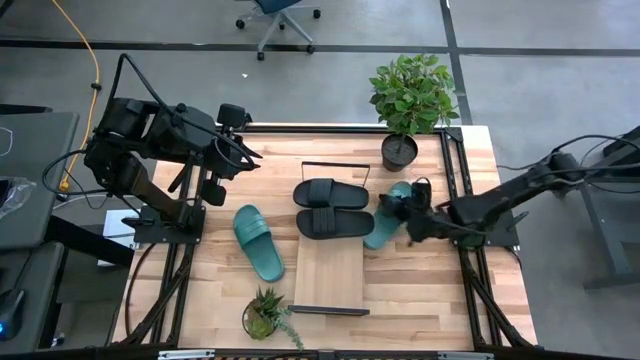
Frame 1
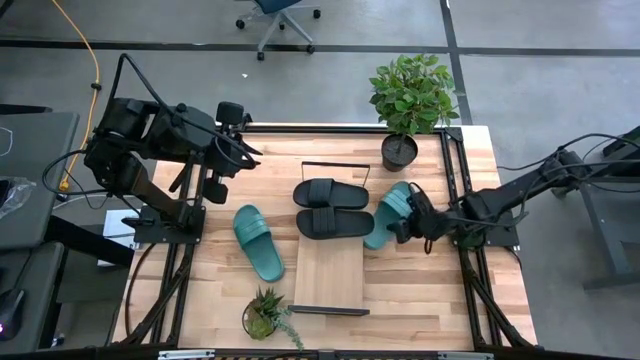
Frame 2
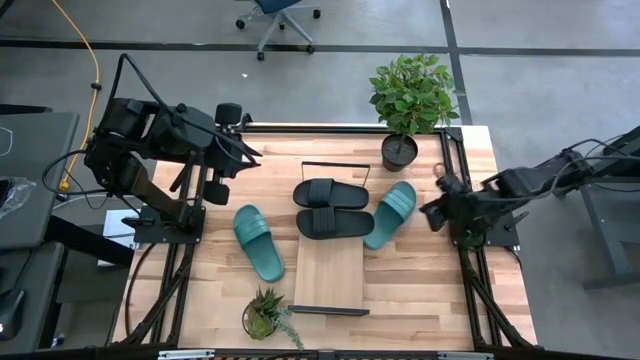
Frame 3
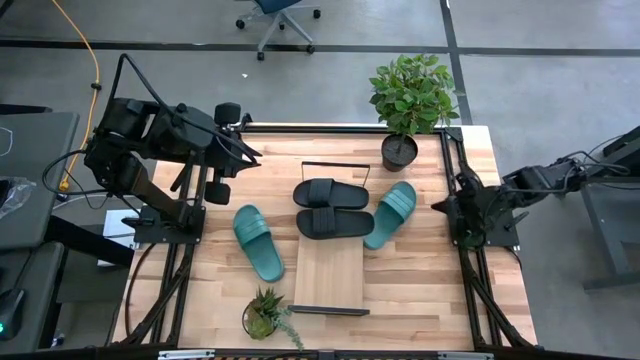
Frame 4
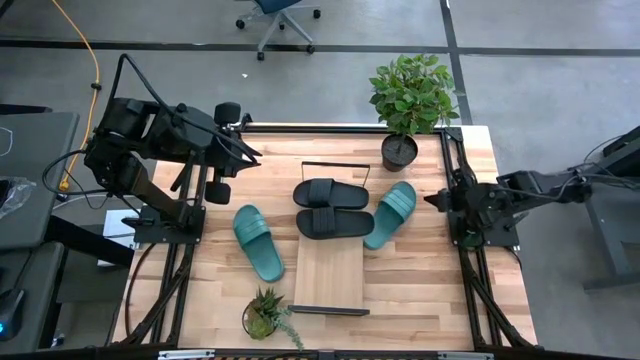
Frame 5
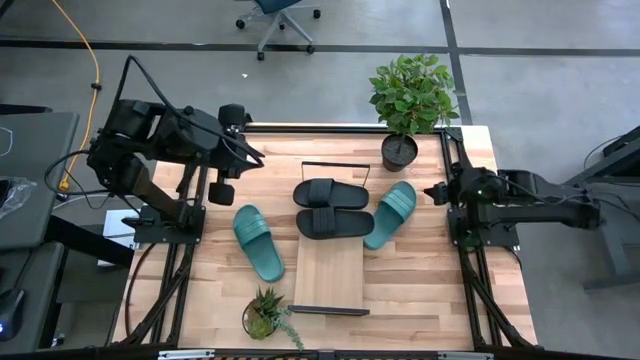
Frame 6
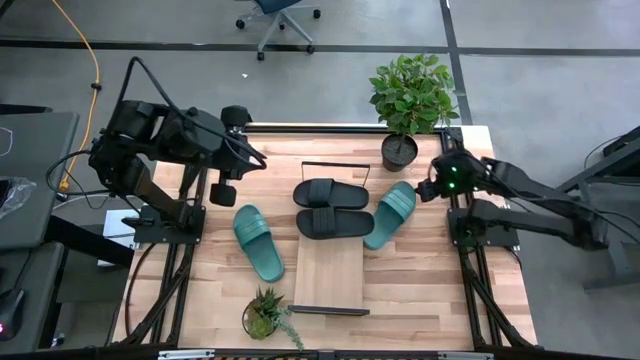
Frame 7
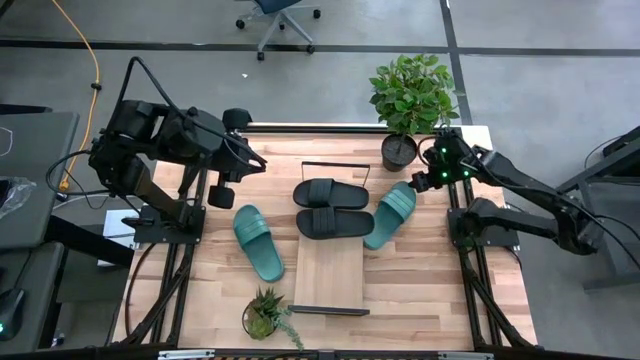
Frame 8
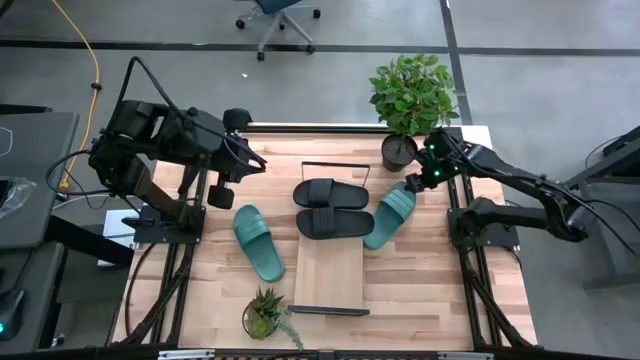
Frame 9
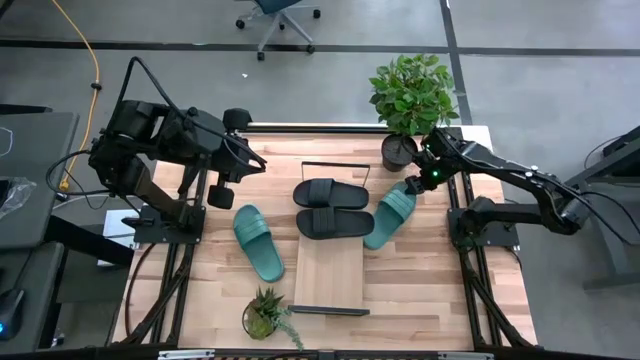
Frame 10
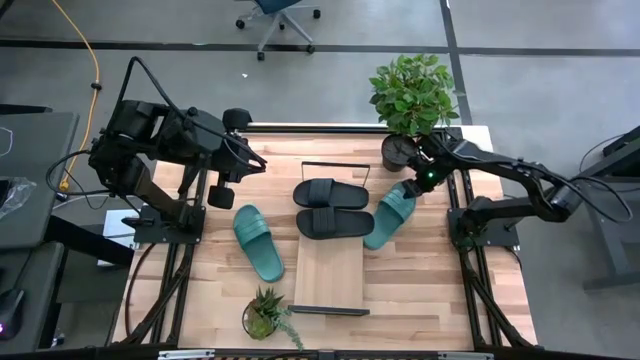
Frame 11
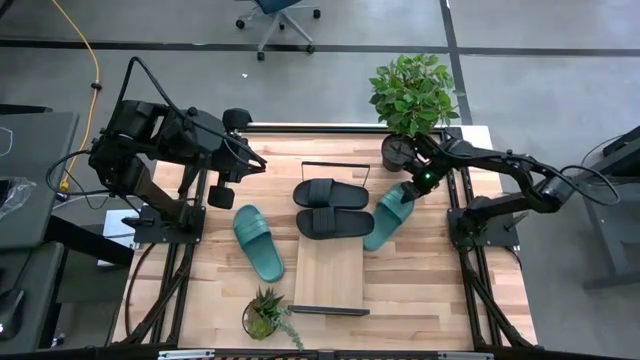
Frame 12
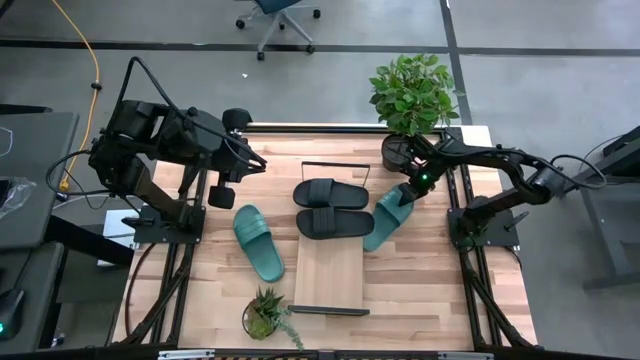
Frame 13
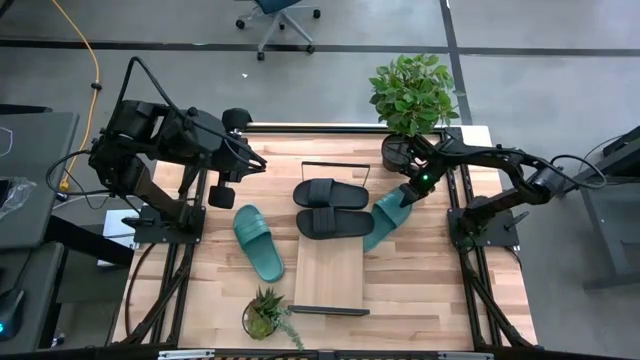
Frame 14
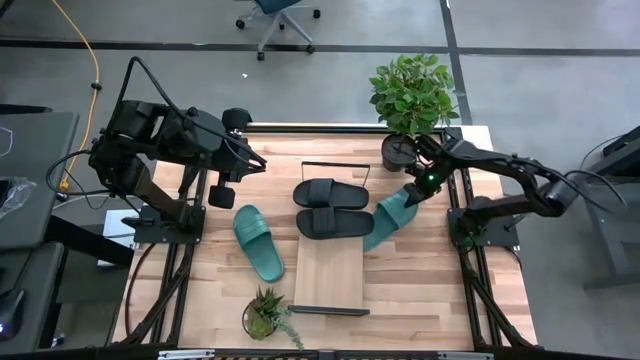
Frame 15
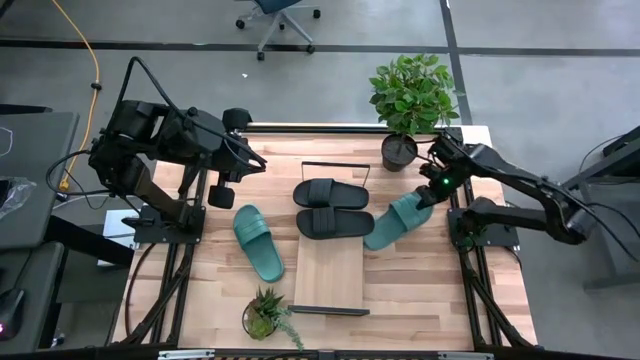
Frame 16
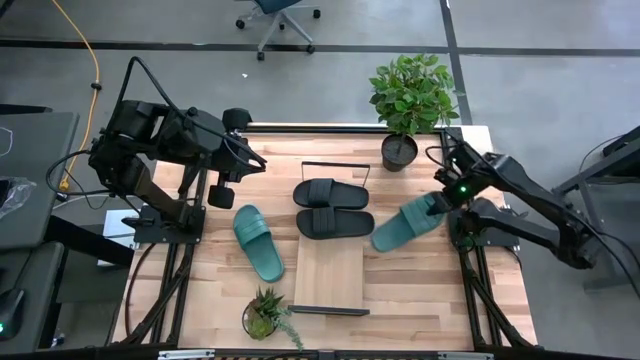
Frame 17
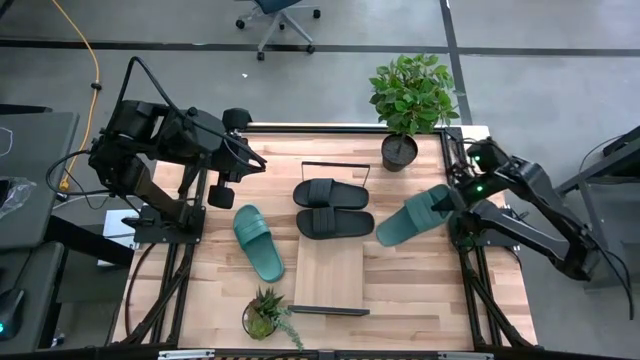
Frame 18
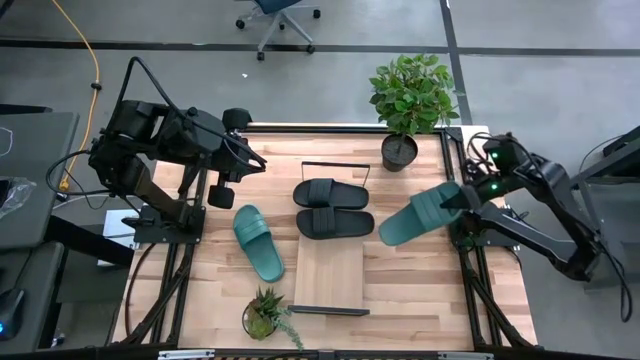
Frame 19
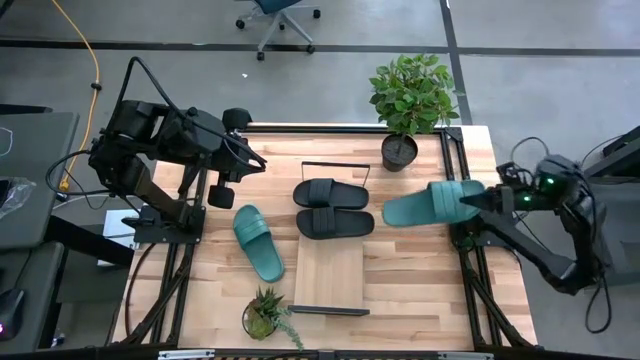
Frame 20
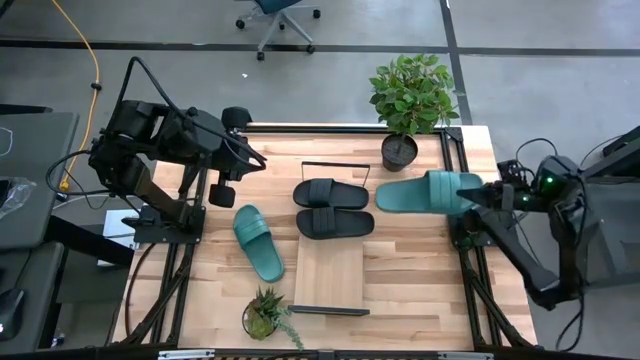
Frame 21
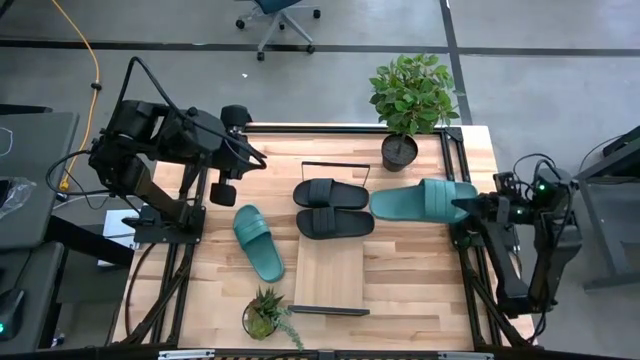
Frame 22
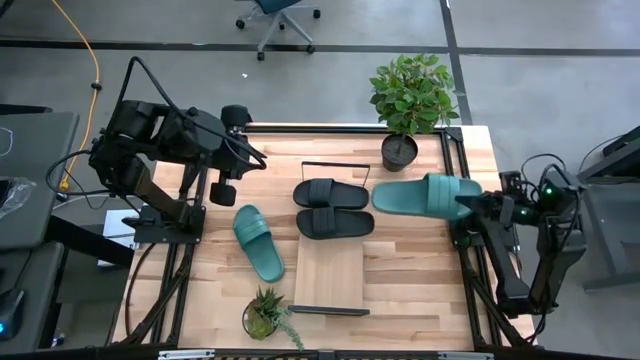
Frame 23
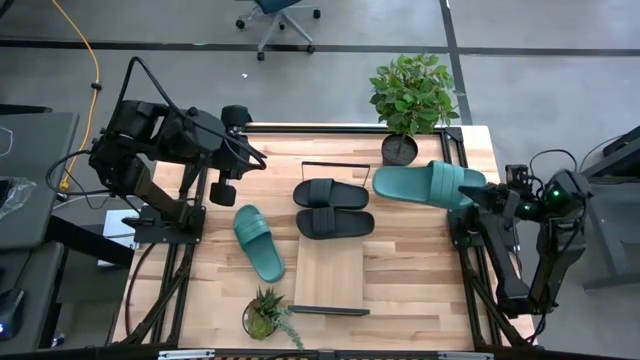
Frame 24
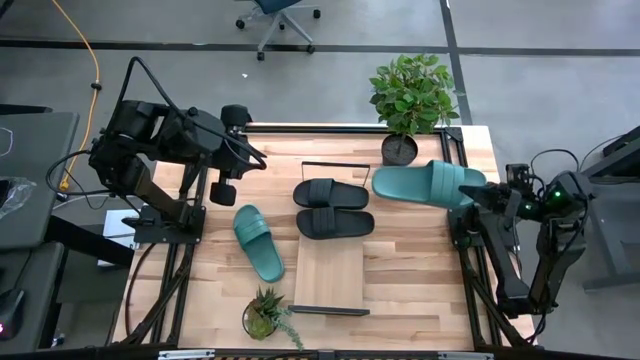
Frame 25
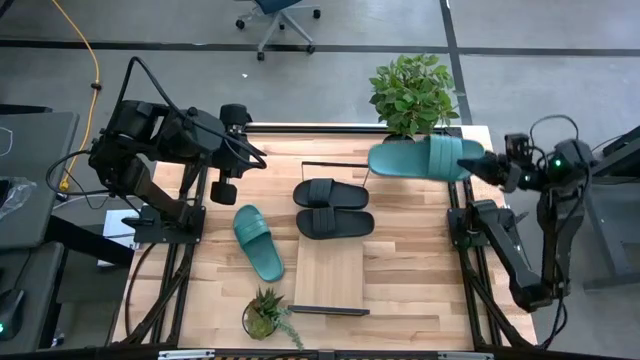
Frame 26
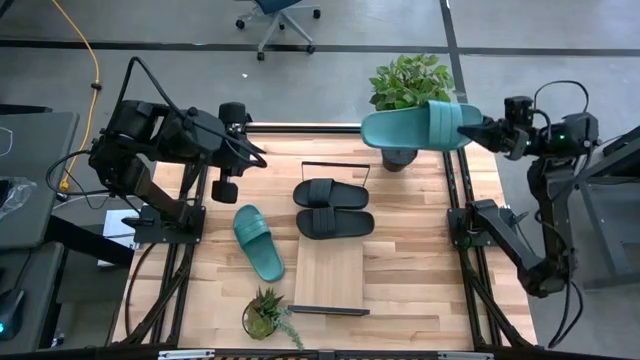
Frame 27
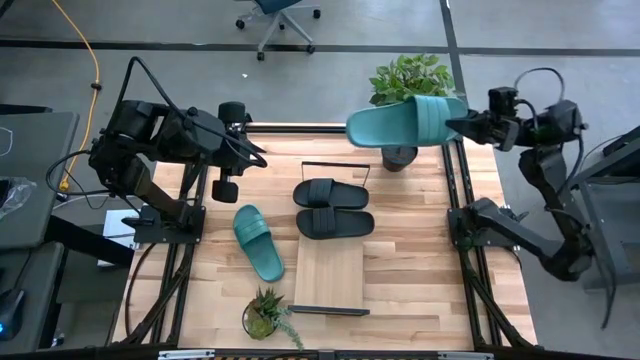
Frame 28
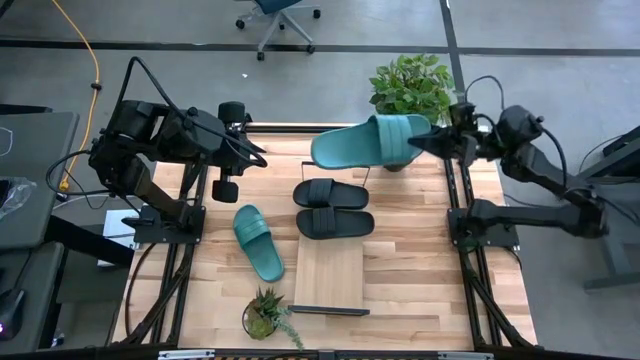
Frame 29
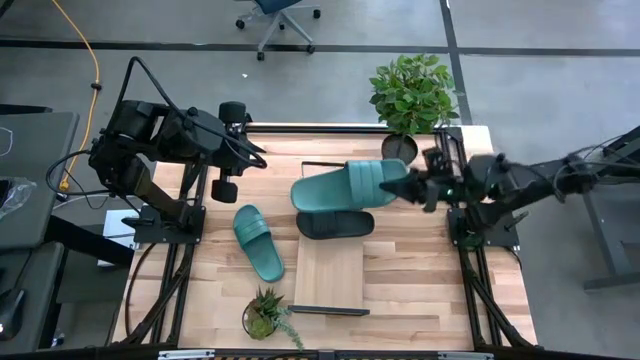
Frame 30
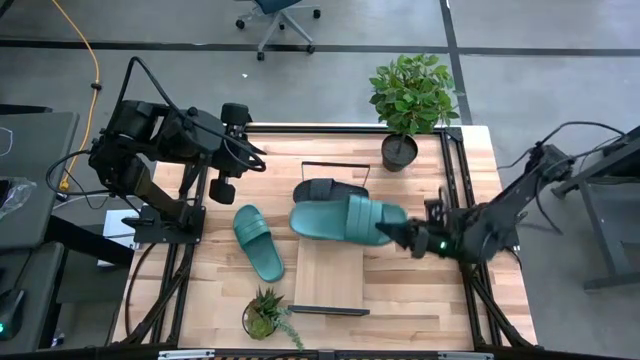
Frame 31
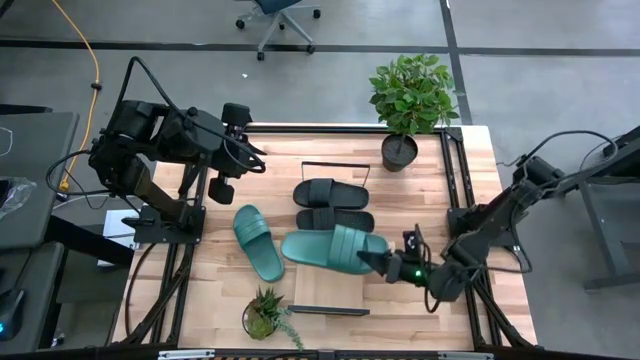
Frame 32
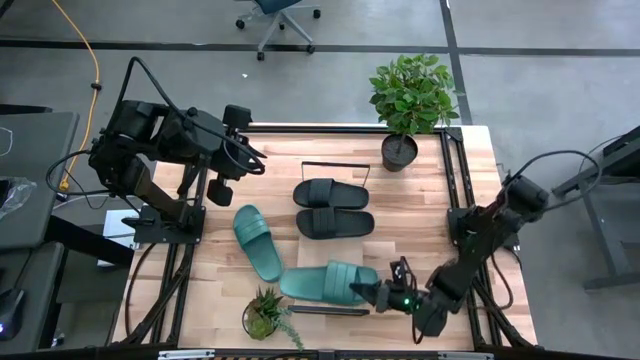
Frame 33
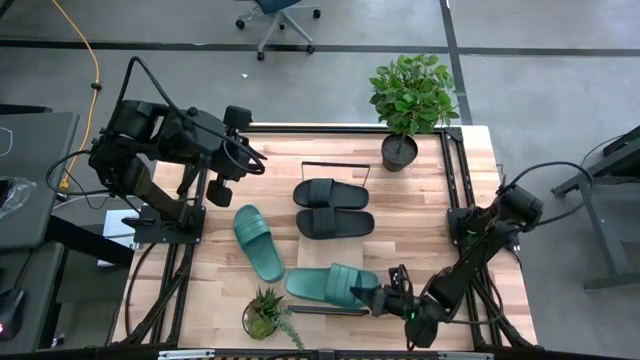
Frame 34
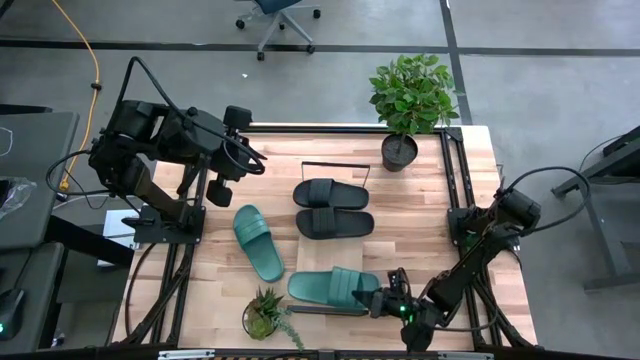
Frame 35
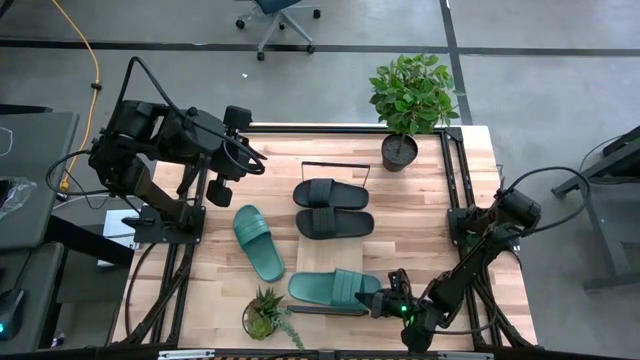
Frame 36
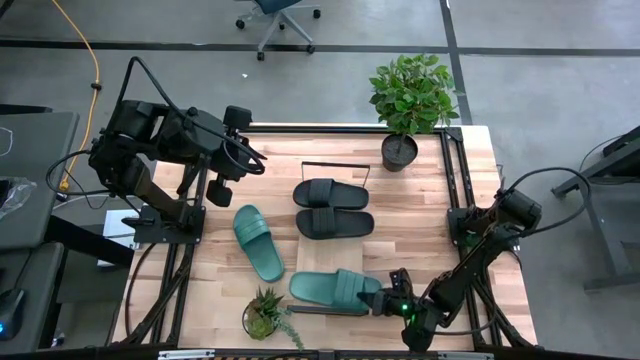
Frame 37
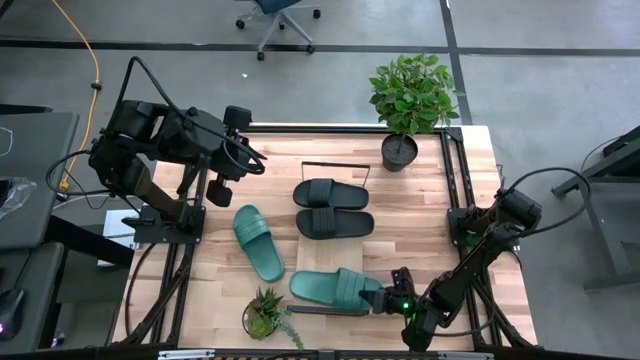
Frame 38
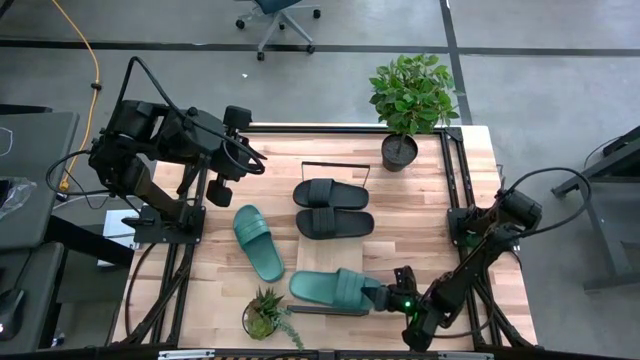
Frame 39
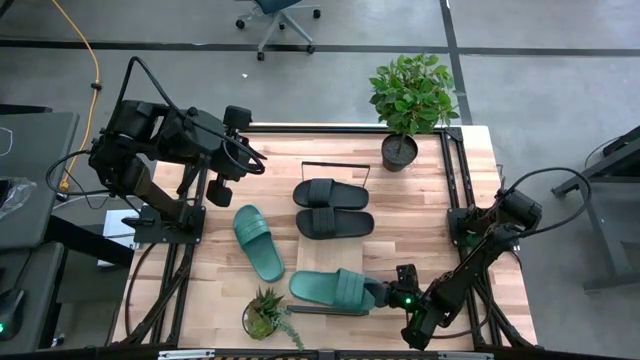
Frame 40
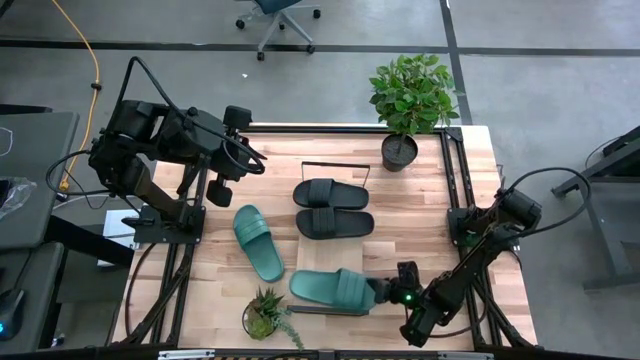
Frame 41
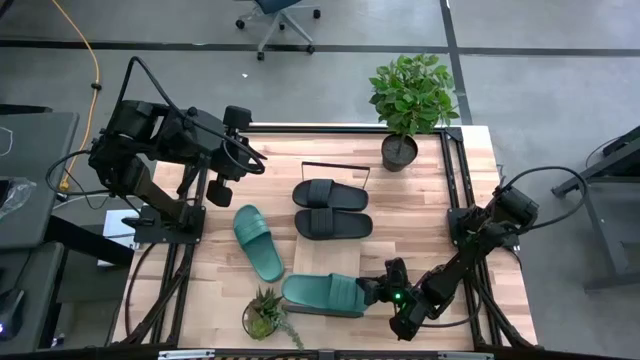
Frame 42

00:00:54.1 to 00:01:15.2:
Task: Pick and place slides into the shelf
Put the right green slides on the shelf

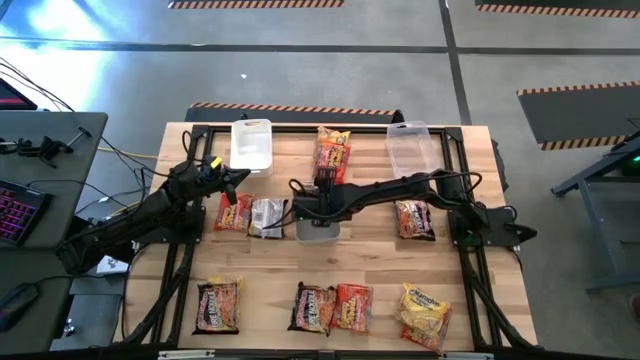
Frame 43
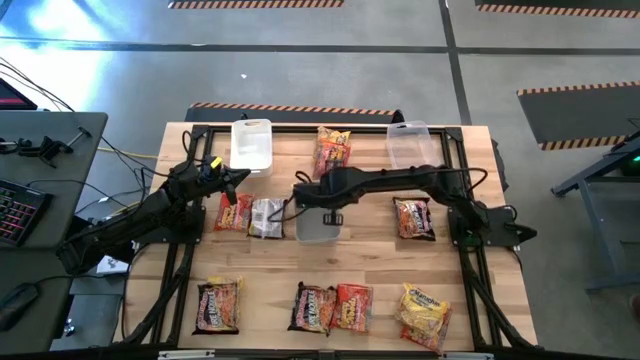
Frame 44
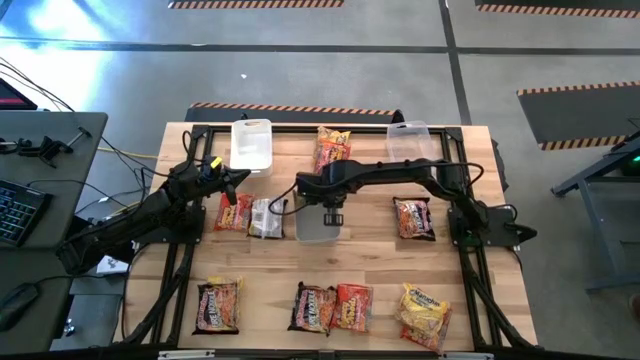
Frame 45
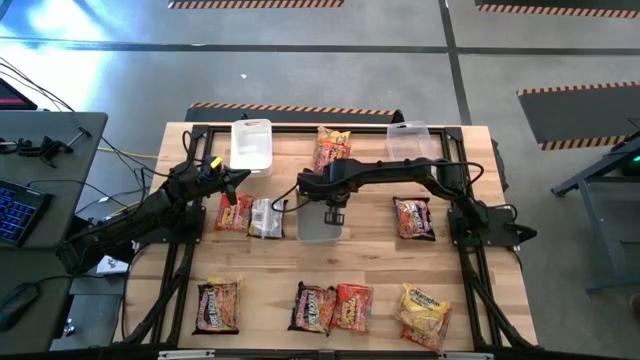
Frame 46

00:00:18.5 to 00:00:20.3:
Task: Sort Maruchan noodles
Adjust the gray bin
